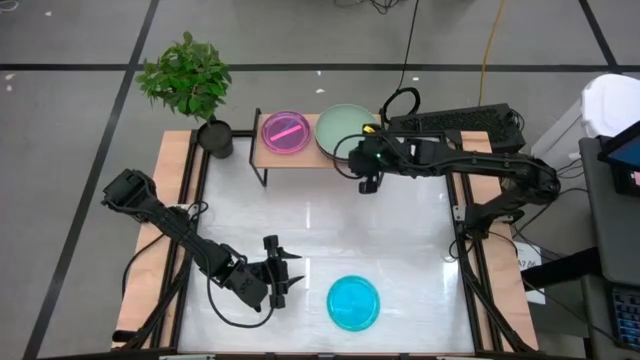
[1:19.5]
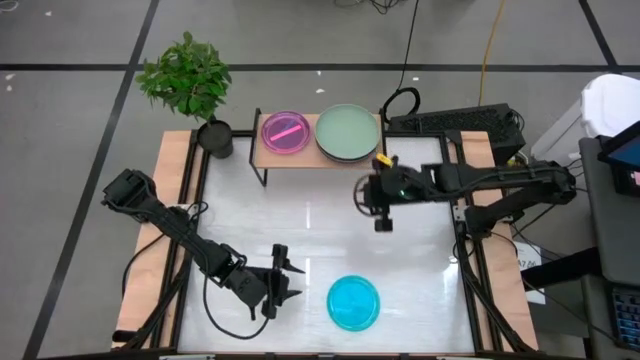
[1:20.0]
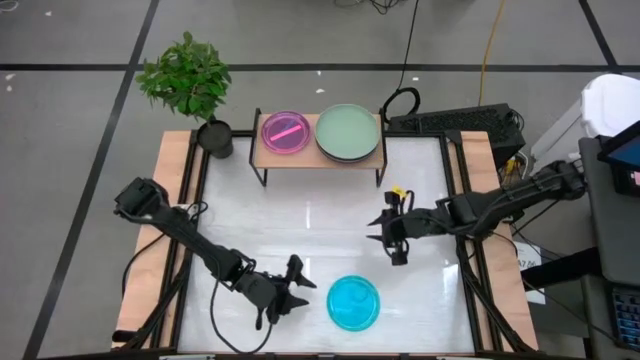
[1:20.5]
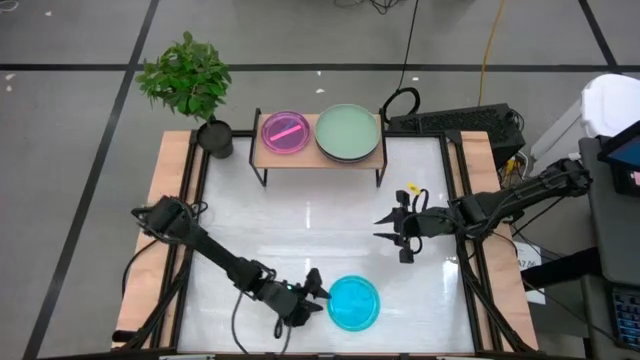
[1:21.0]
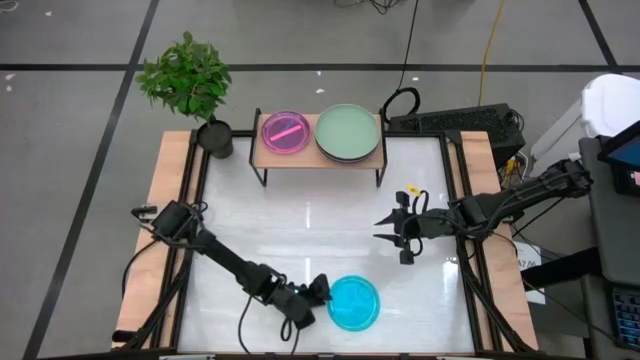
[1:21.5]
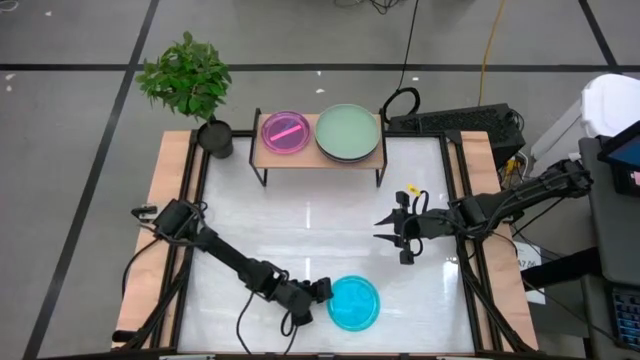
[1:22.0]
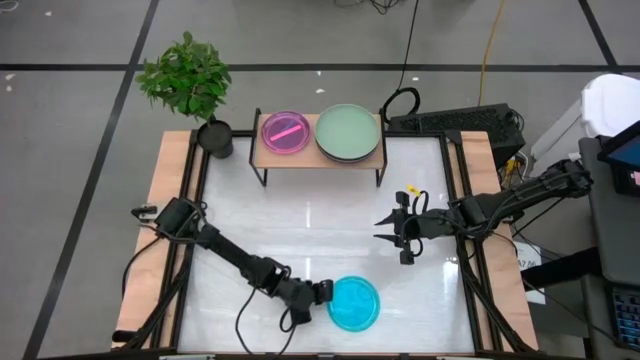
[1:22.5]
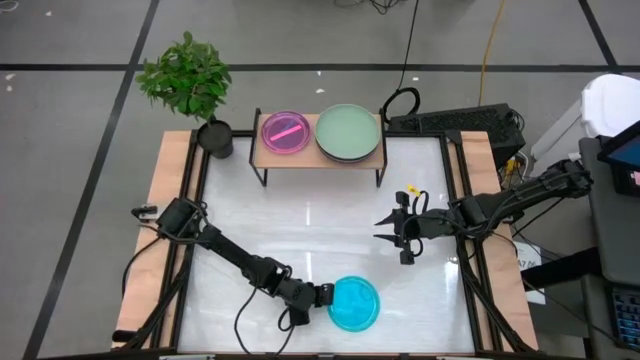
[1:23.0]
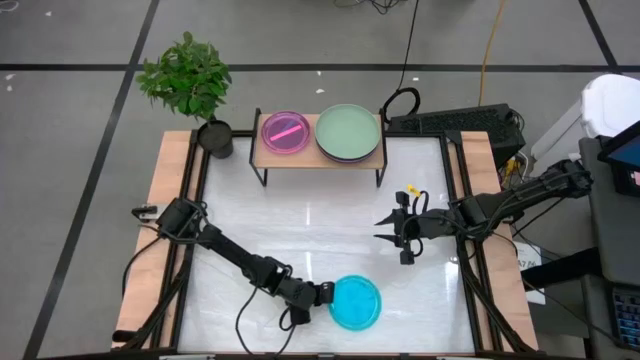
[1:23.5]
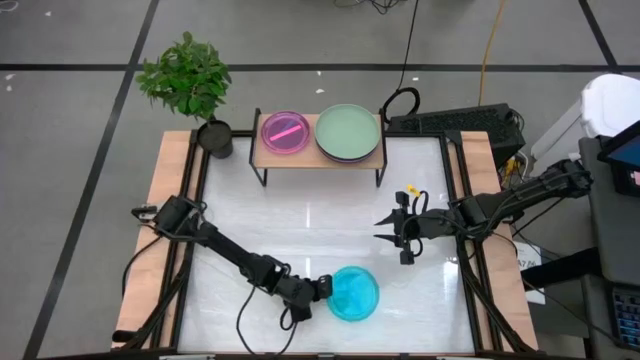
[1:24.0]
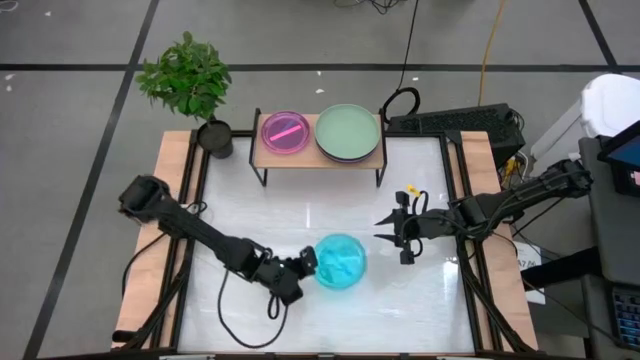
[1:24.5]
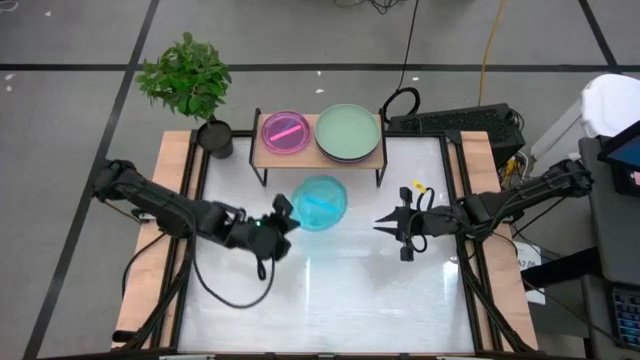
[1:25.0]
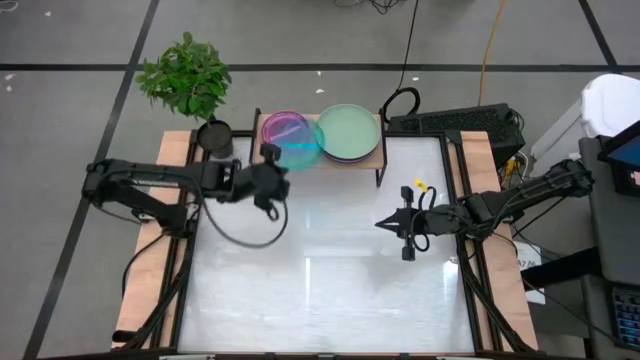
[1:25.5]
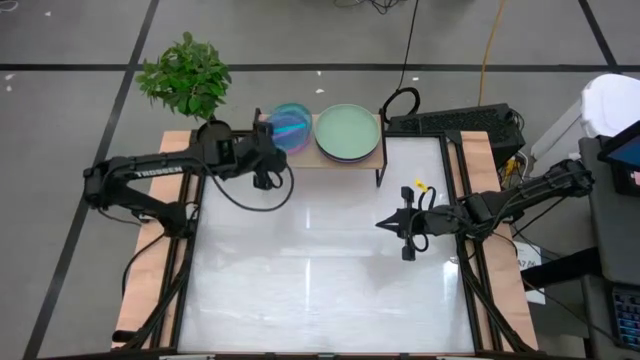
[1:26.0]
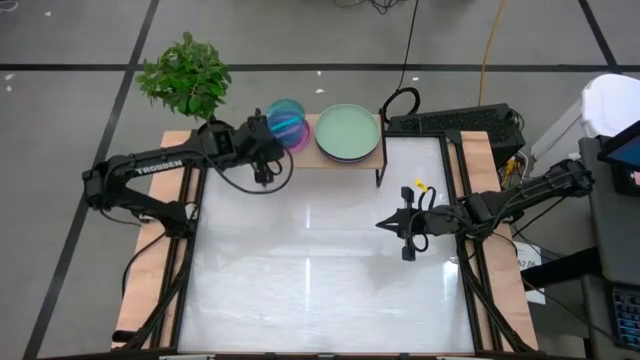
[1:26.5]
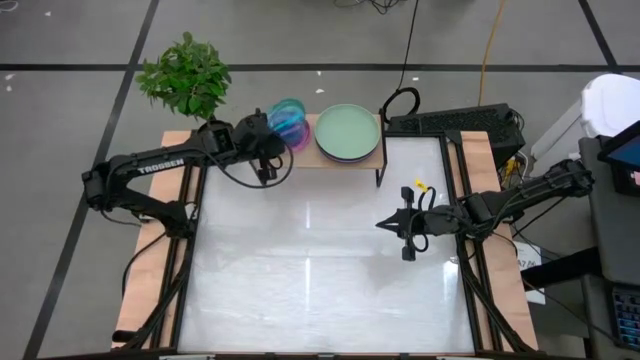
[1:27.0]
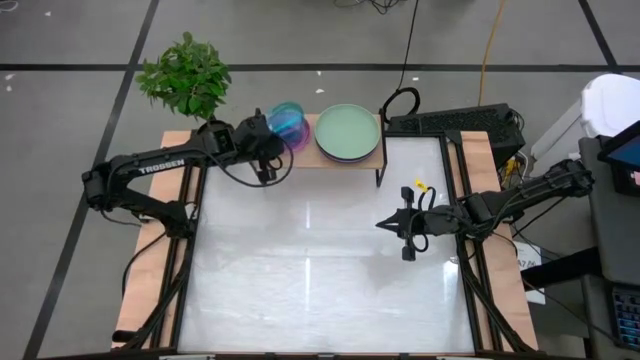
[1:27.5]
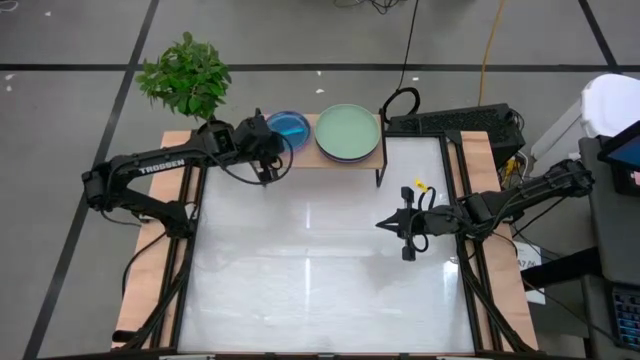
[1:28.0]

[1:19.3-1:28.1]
Task: Place and stack plates onto a shelf
Stack the blue plate on top of the pink plate on the shelf

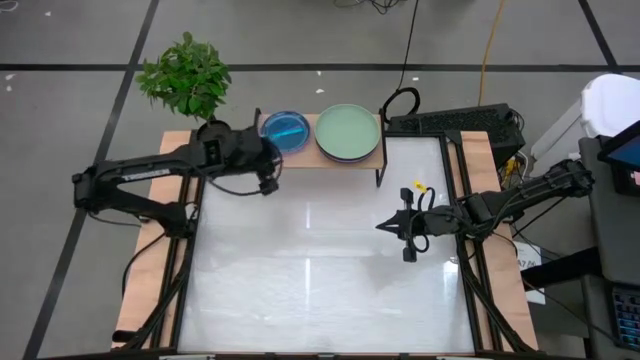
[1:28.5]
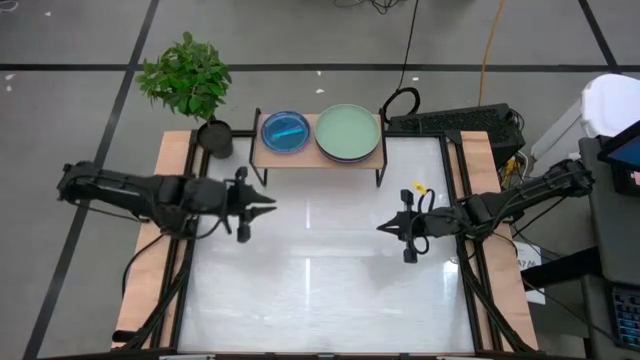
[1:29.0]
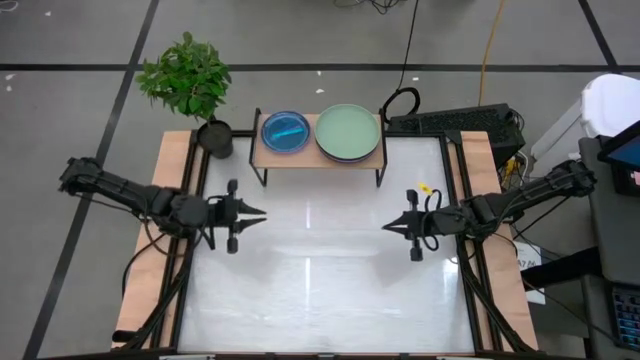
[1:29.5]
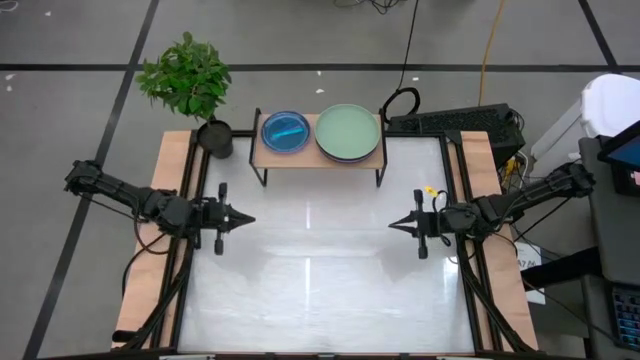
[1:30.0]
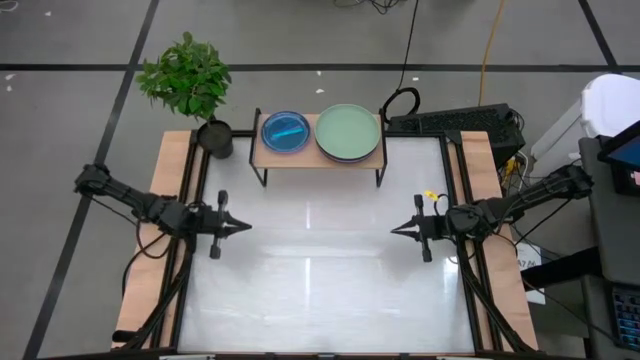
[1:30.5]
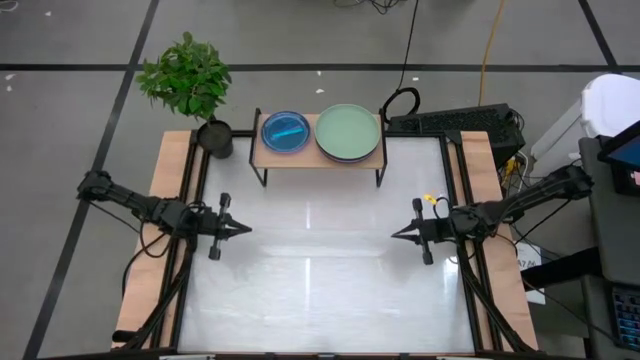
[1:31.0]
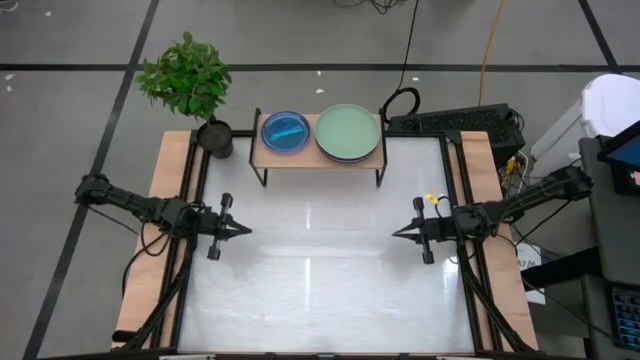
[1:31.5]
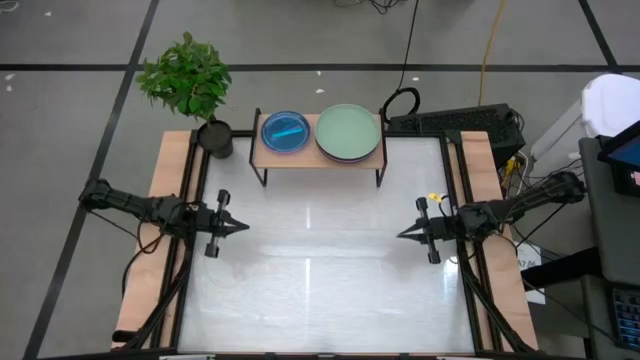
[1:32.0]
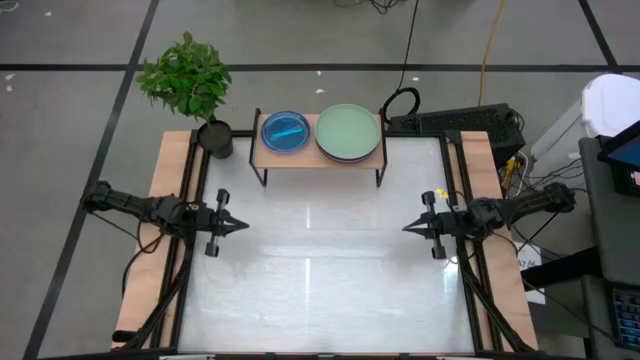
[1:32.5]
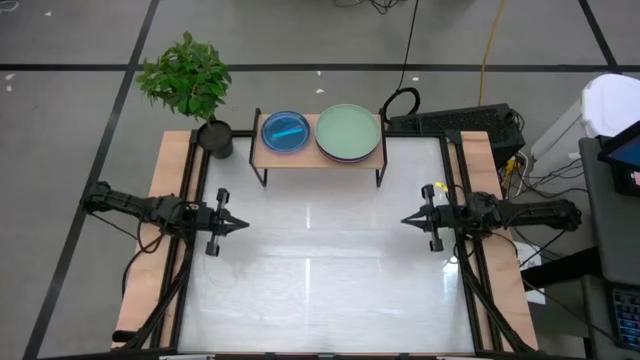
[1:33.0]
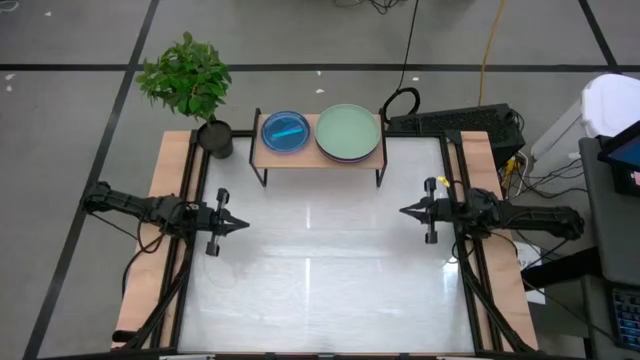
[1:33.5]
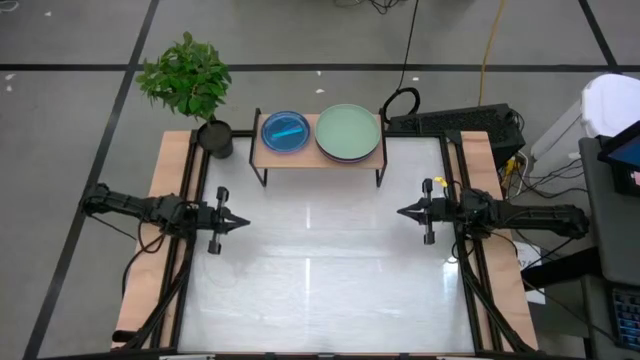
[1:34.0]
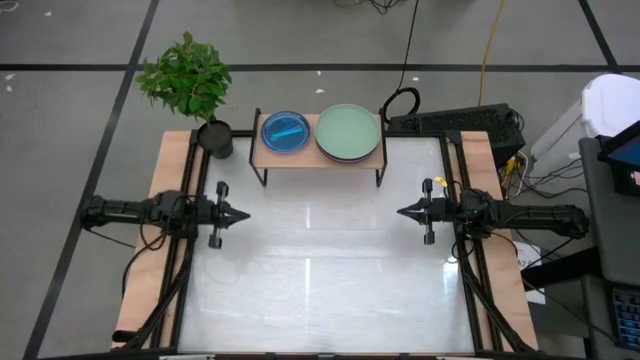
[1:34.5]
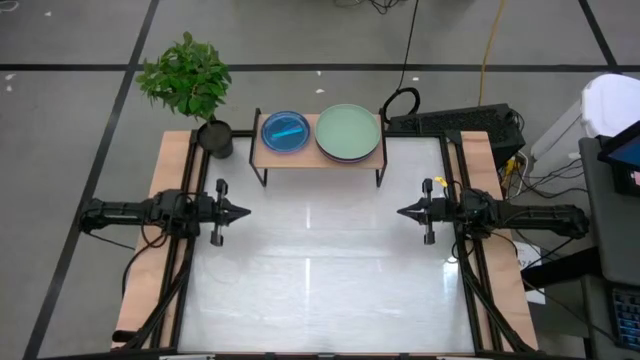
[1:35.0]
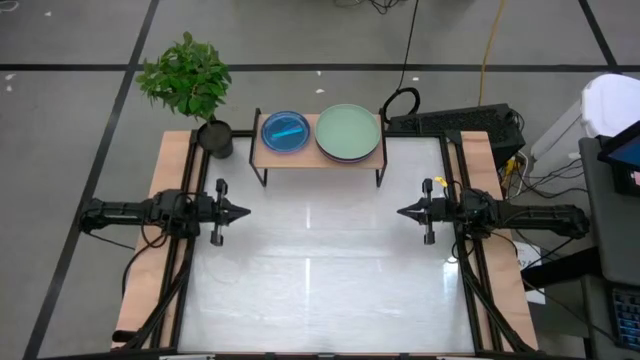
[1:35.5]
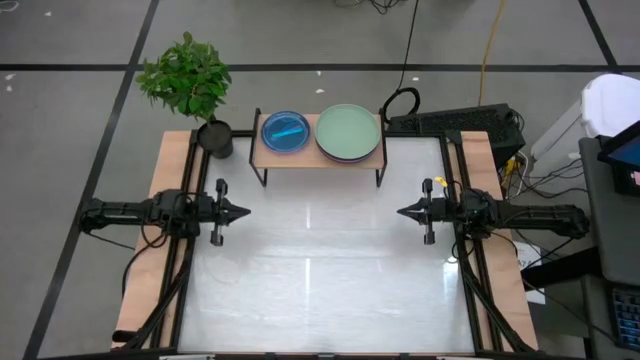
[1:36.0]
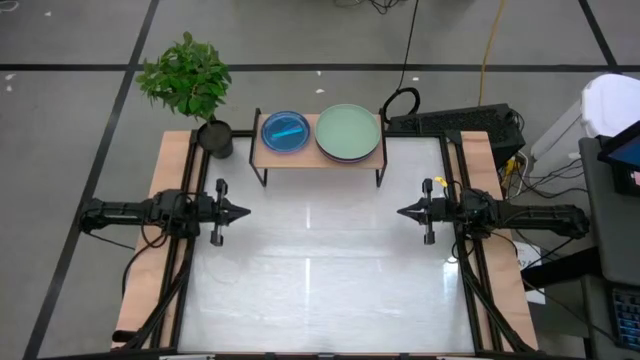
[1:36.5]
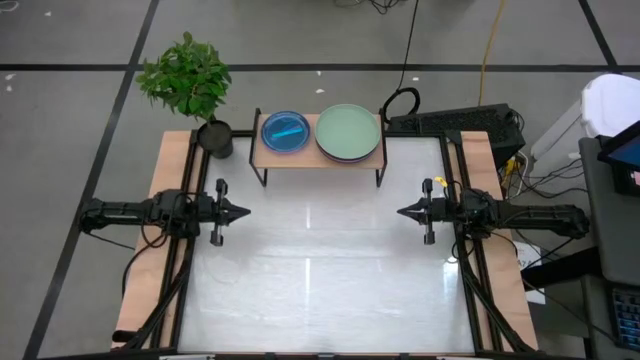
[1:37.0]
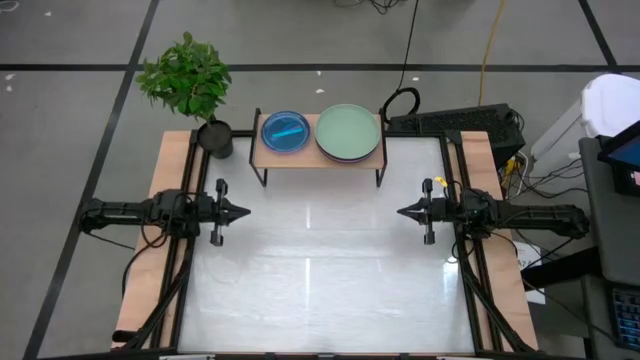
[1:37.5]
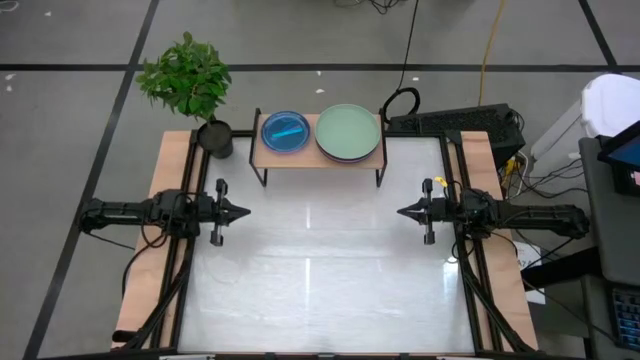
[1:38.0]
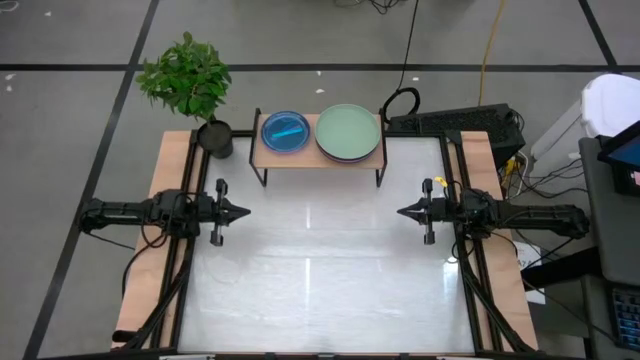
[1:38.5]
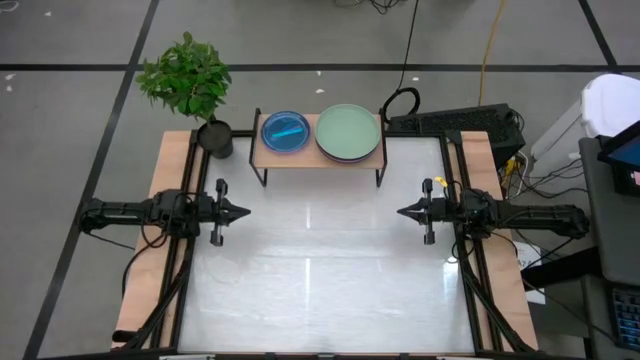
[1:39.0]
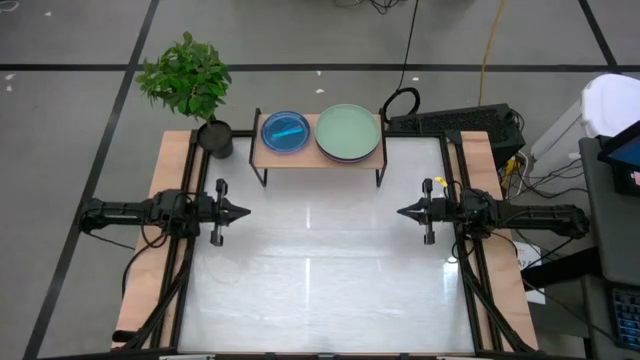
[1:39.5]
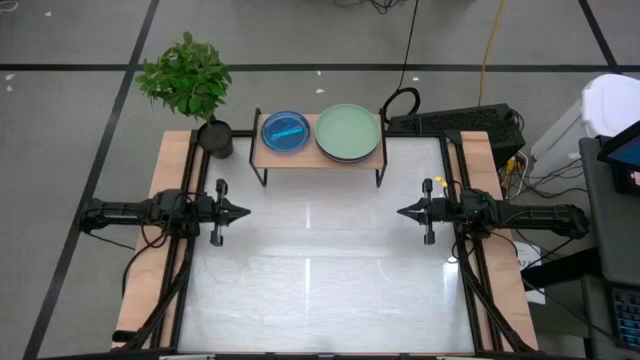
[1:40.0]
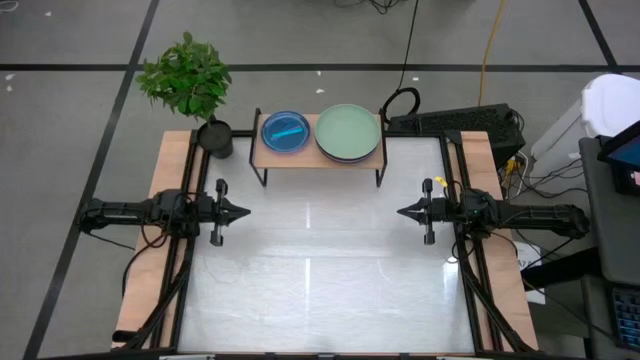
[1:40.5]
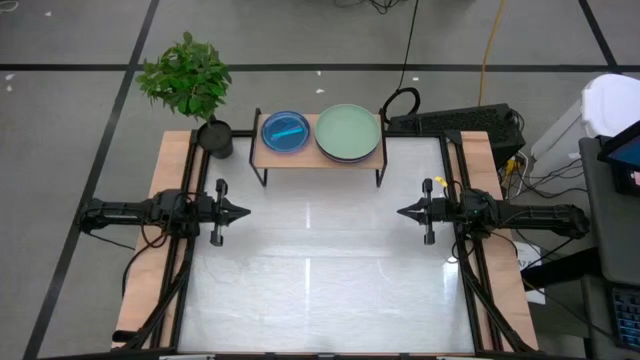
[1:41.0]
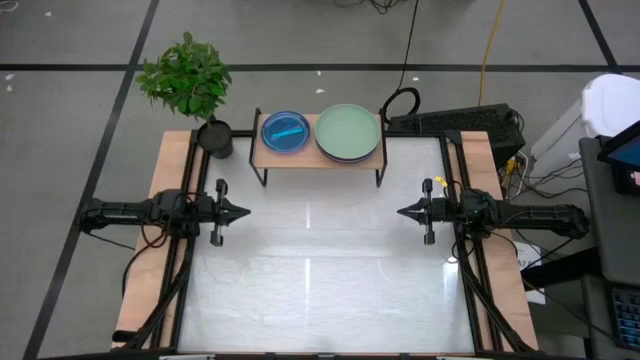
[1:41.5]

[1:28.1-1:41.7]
Return to Home Position
